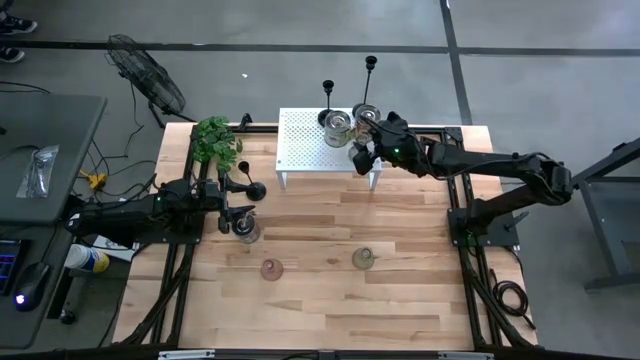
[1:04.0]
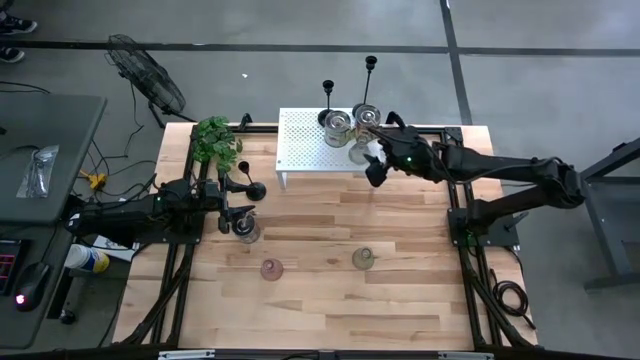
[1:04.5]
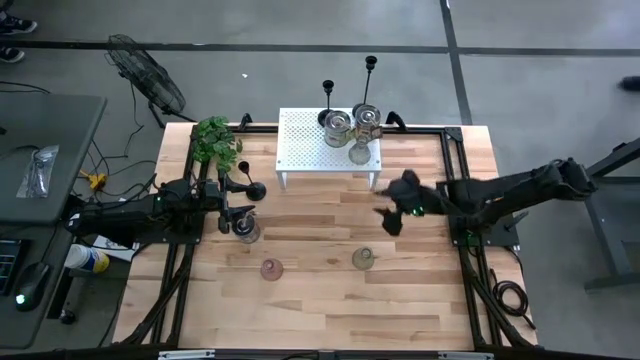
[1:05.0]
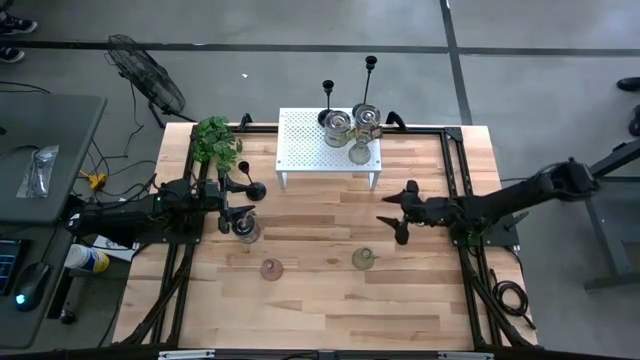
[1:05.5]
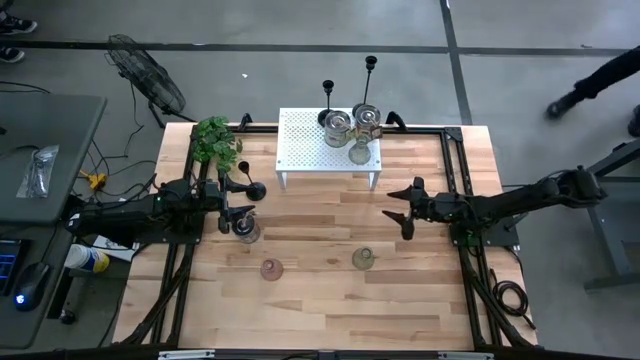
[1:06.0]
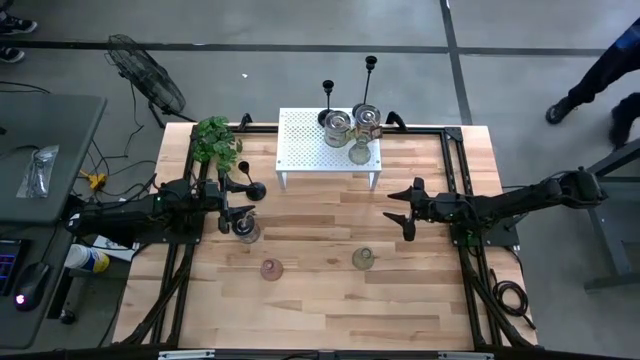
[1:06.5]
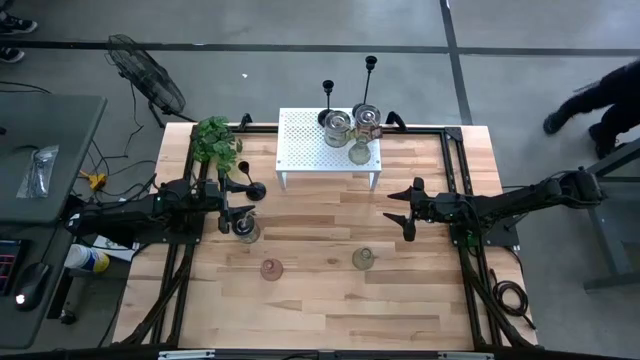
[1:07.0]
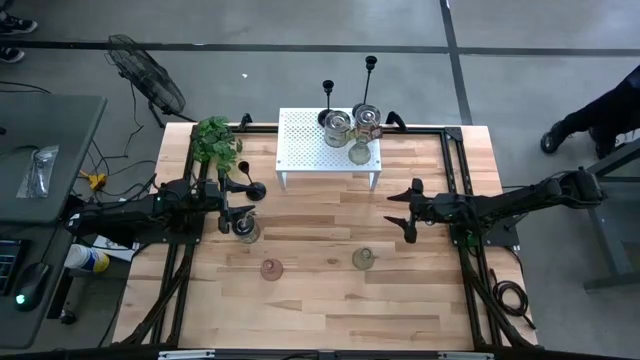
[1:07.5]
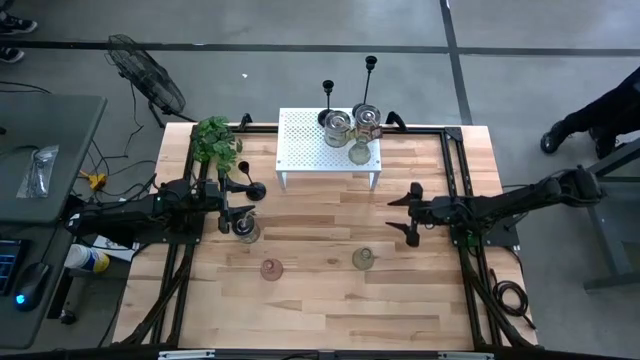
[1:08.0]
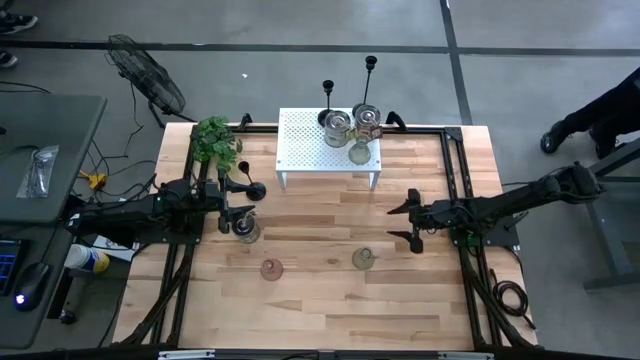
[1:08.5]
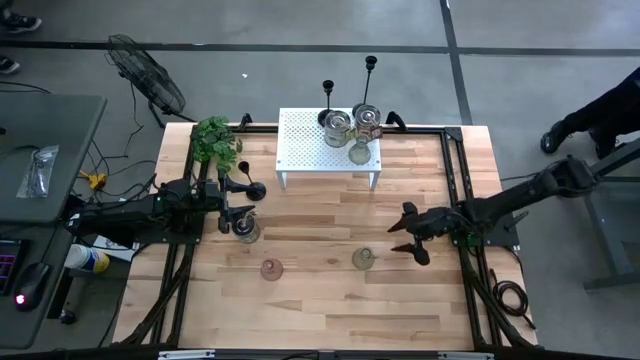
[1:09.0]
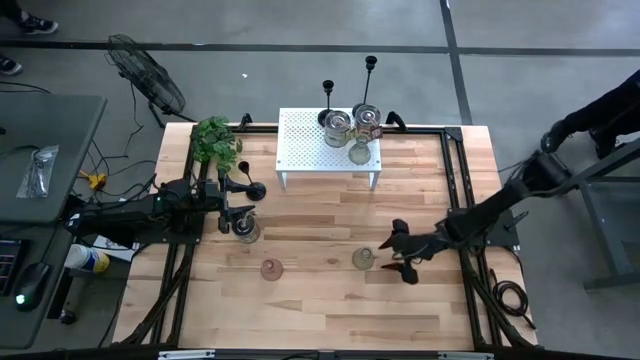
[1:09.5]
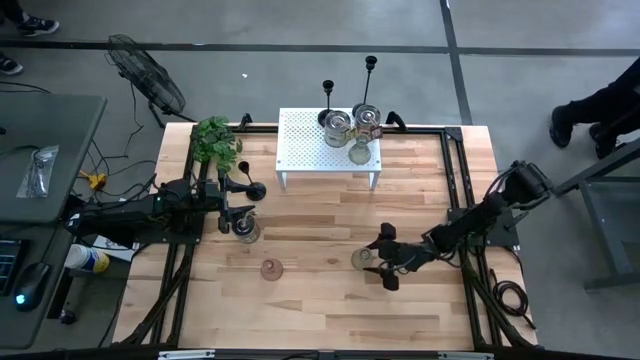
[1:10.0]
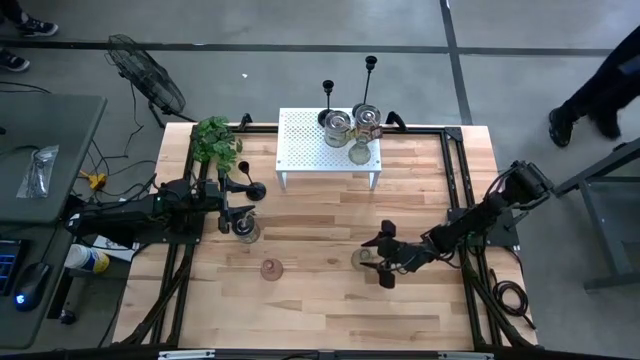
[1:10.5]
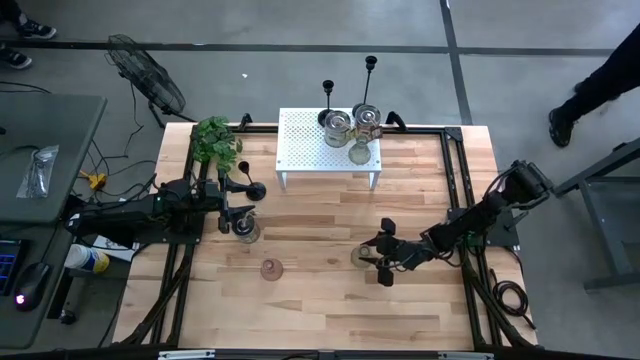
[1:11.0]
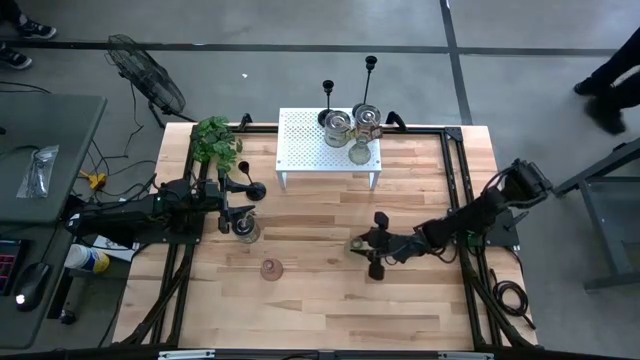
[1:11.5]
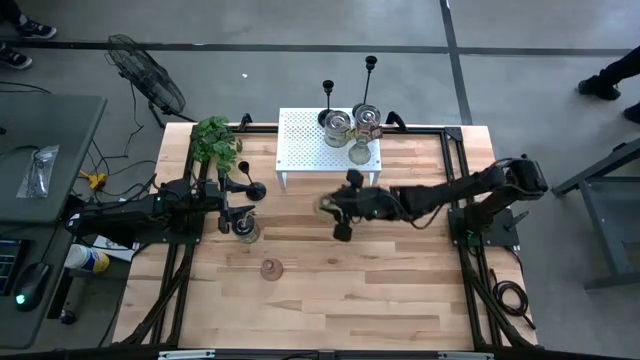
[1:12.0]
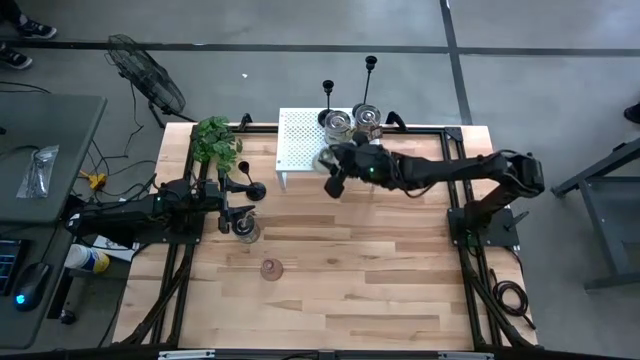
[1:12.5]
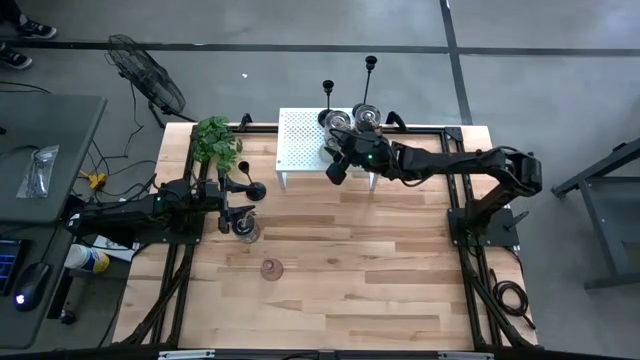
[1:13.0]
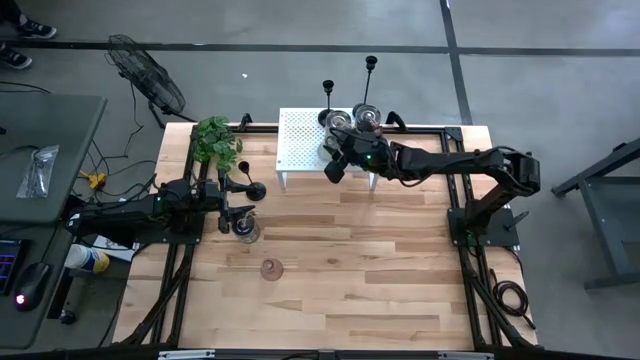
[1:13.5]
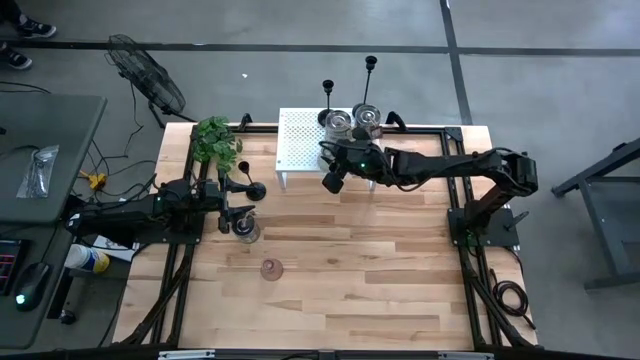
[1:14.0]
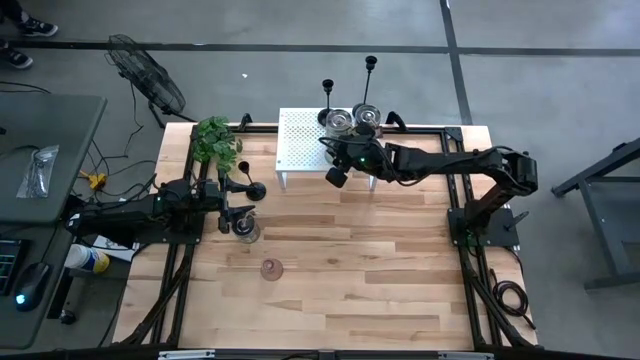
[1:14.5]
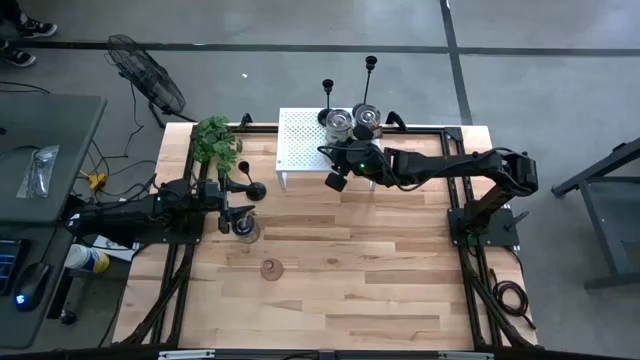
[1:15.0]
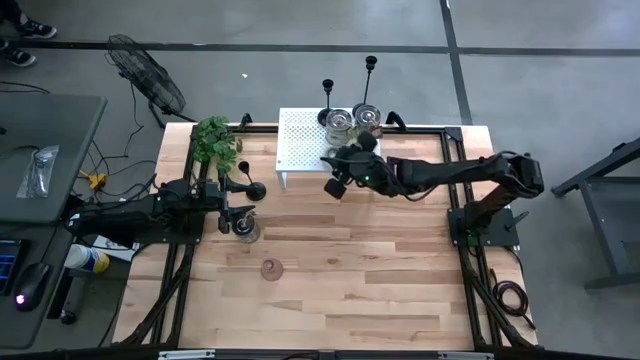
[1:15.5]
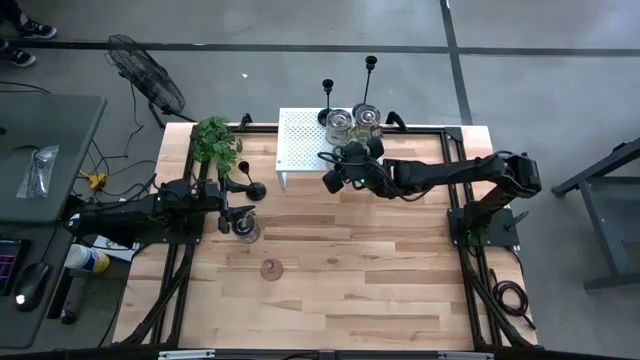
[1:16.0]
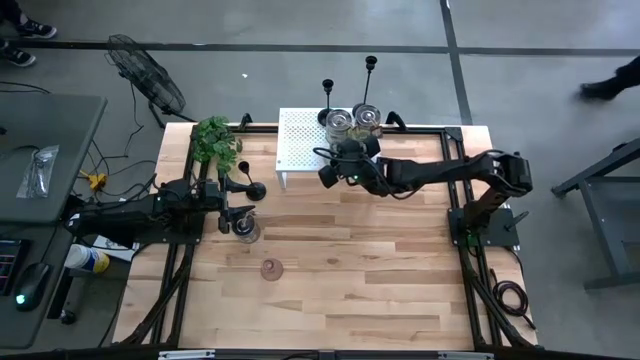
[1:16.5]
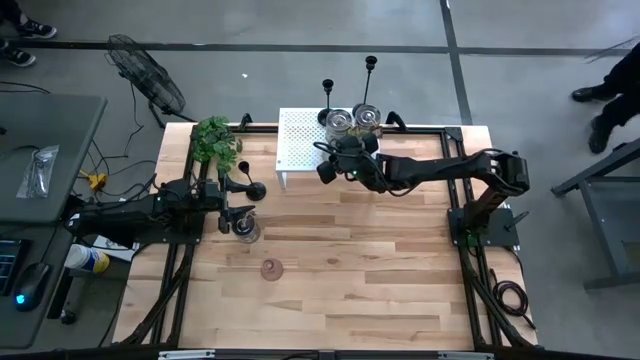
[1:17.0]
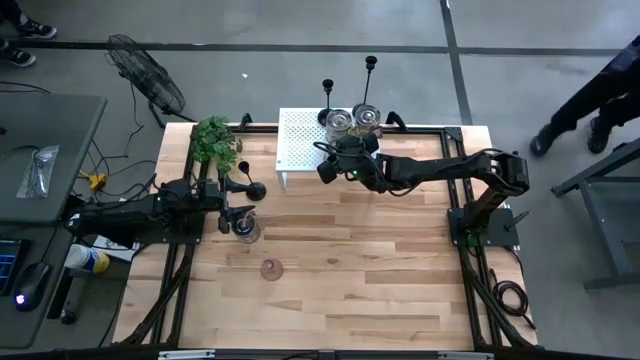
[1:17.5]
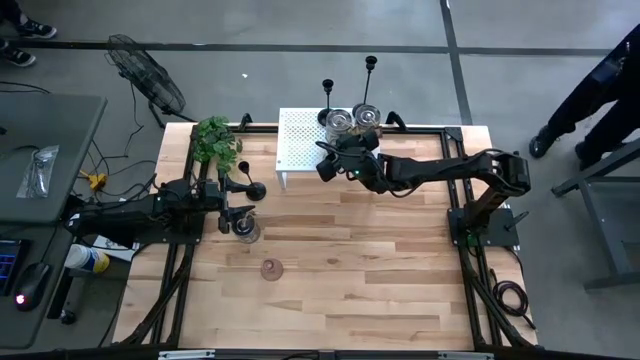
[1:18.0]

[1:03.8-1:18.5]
Task: Pick & Place candle stick holders
Put the transparent glass candle holder on the shelf

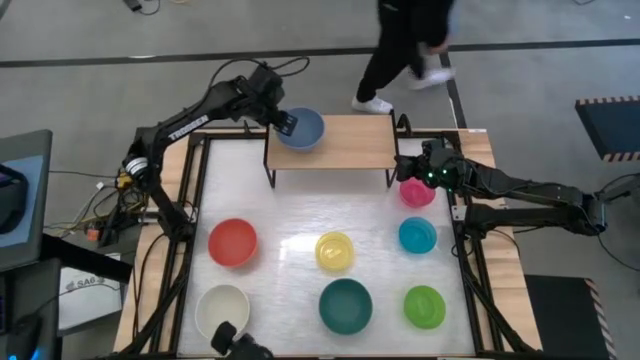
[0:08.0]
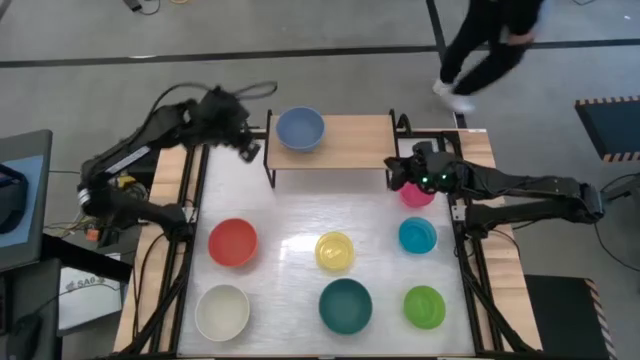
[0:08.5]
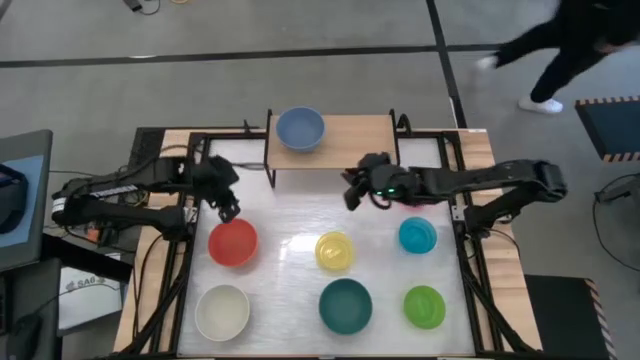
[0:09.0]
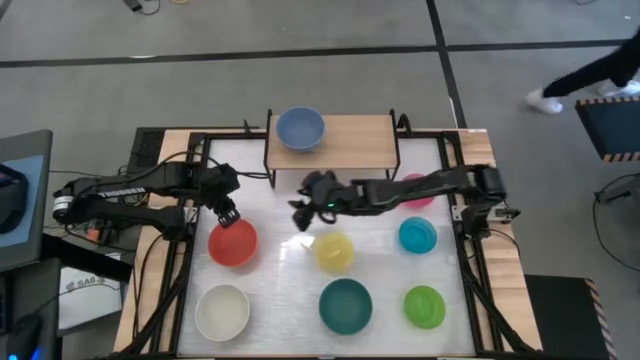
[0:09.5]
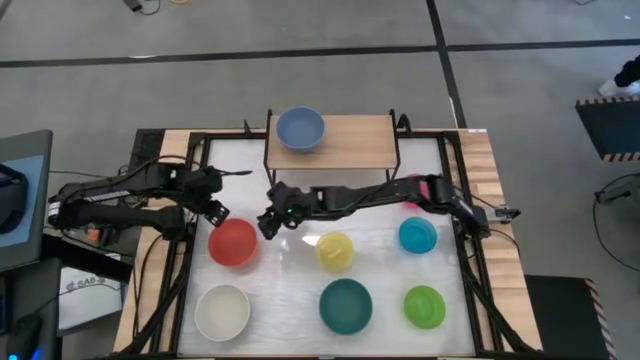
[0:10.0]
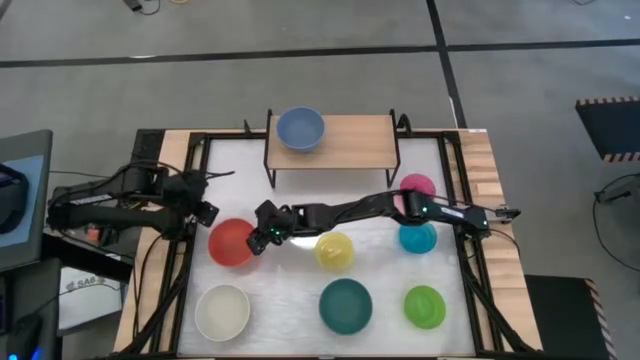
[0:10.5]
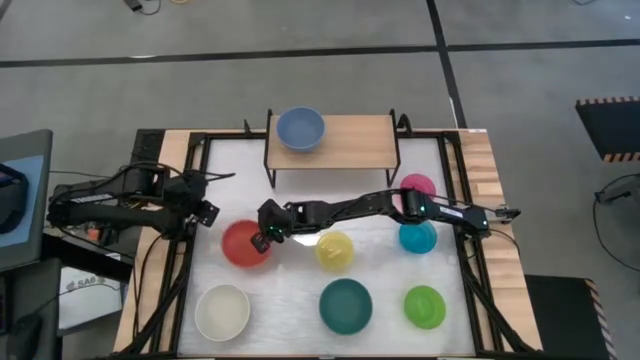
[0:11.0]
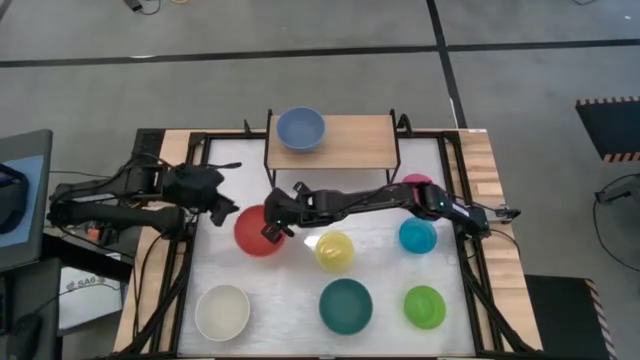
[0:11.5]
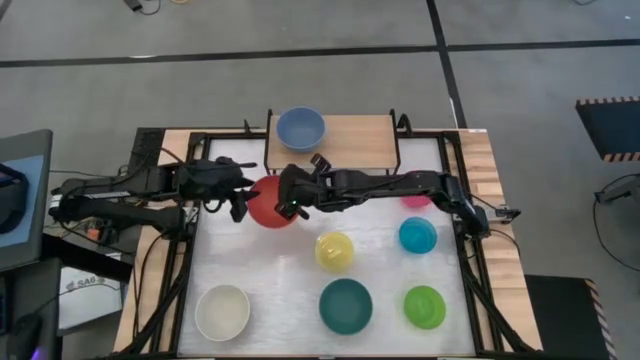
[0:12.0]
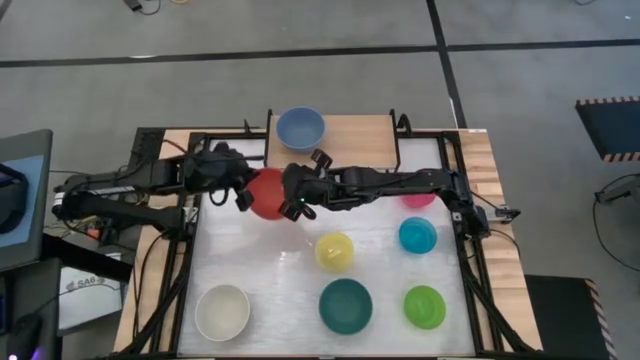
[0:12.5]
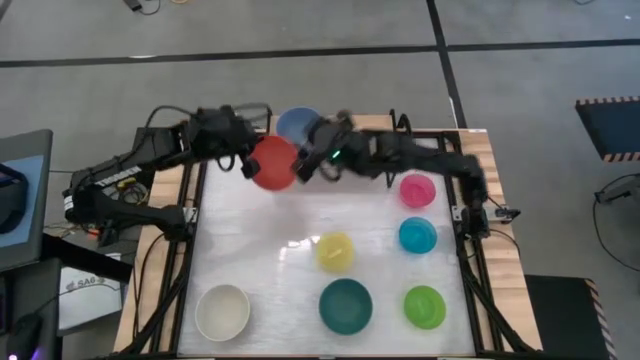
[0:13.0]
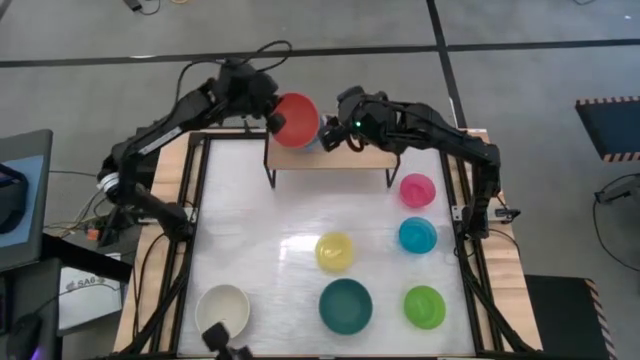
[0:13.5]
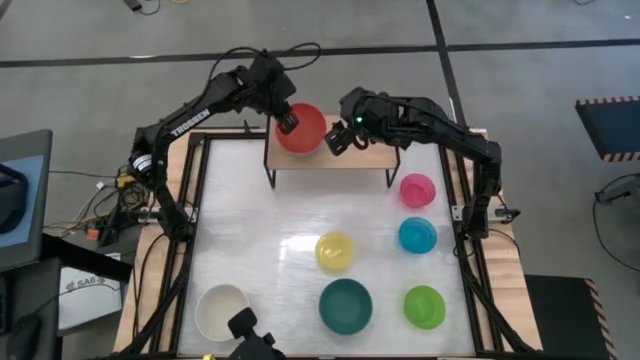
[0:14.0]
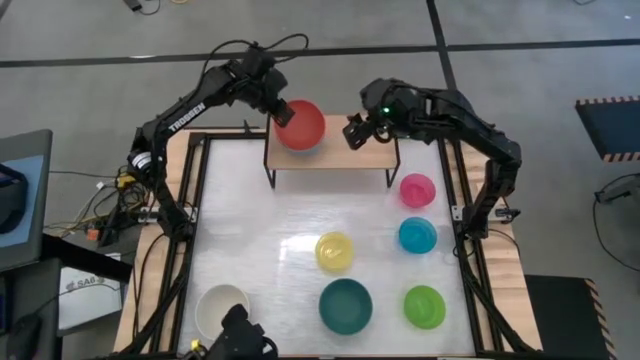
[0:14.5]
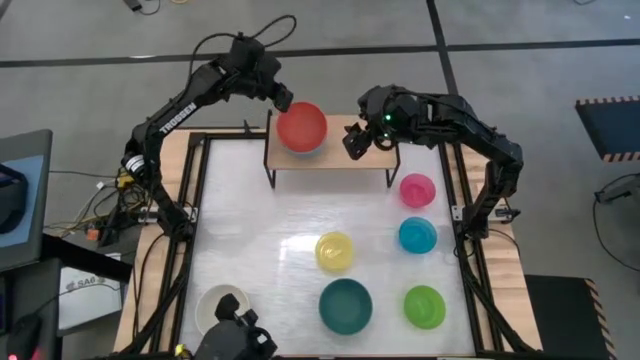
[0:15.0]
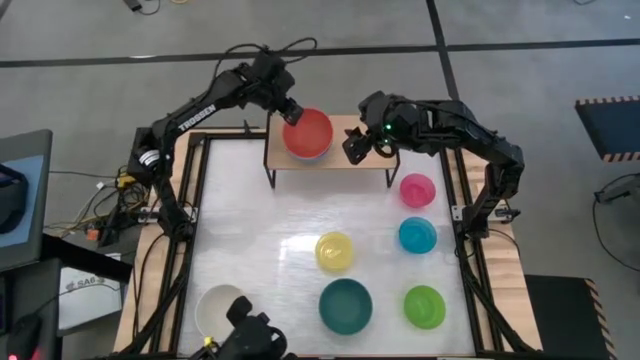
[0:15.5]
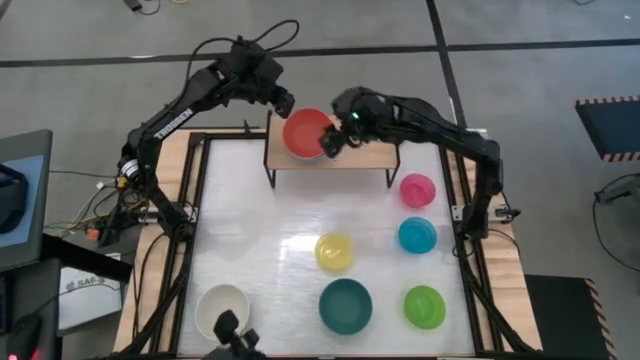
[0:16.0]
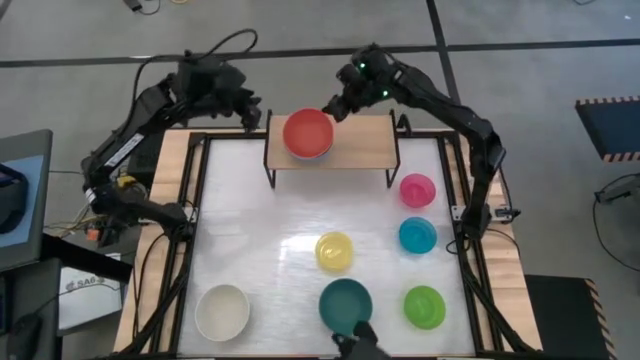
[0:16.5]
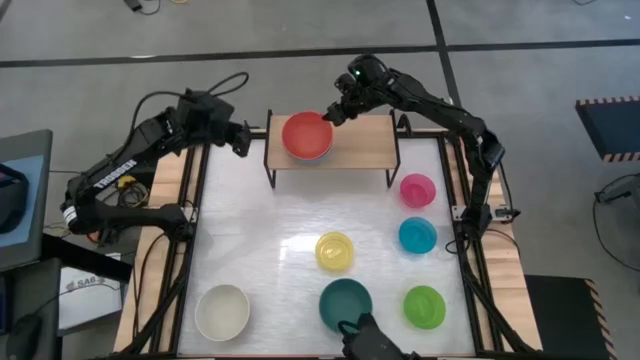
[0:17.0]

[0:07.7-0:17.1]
Task: Place and stack bowls onto a shelf
Stack the orange bowl on top of the blue bowl on the shelf
